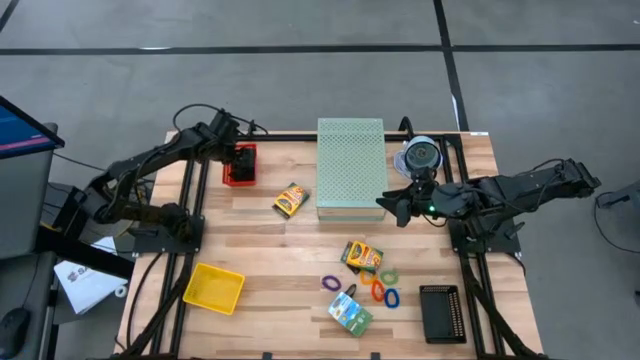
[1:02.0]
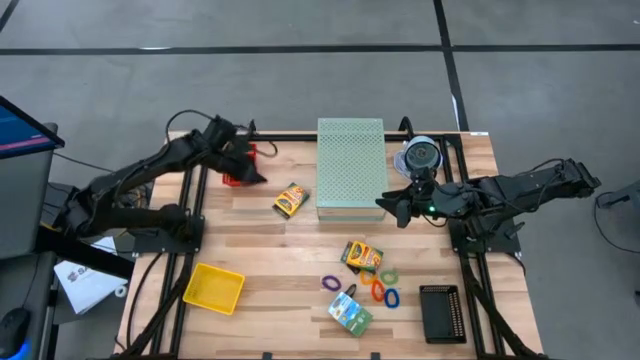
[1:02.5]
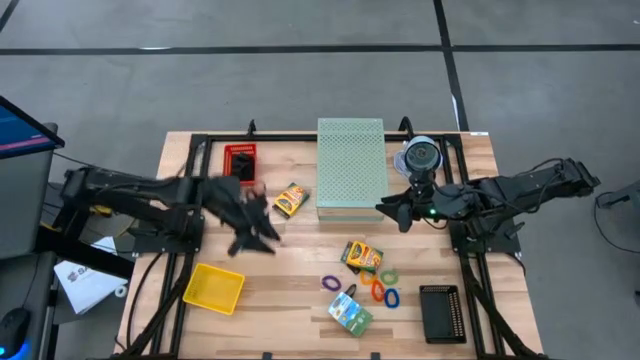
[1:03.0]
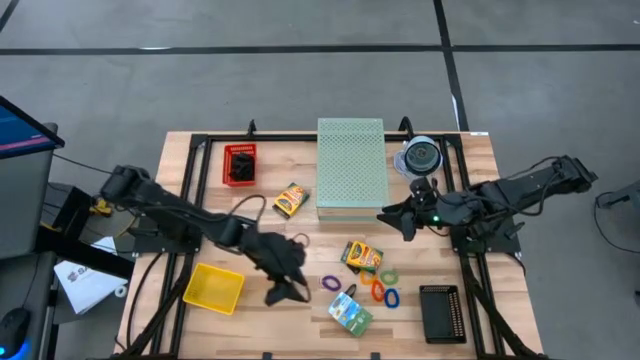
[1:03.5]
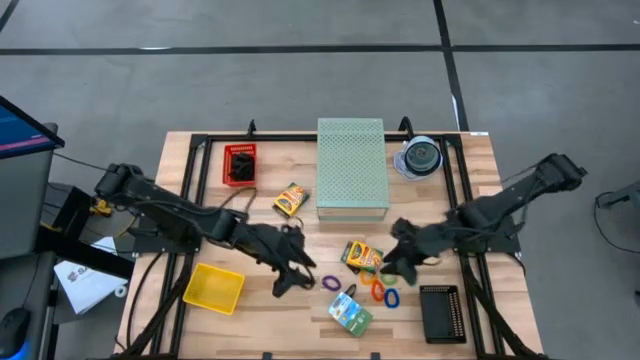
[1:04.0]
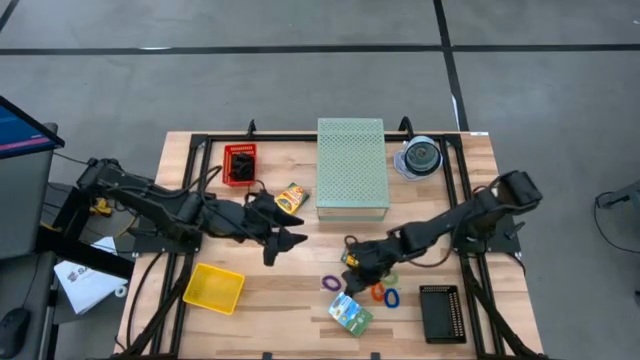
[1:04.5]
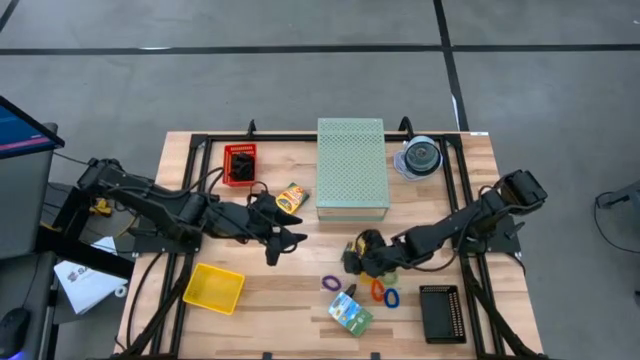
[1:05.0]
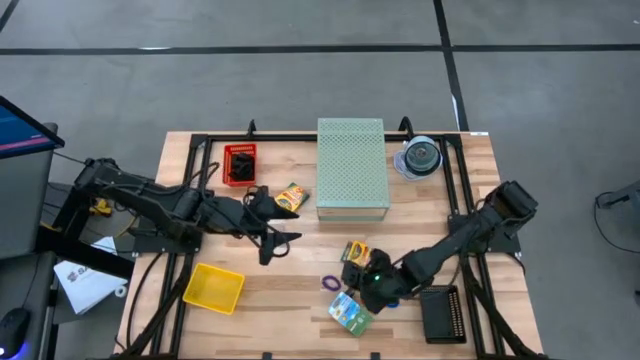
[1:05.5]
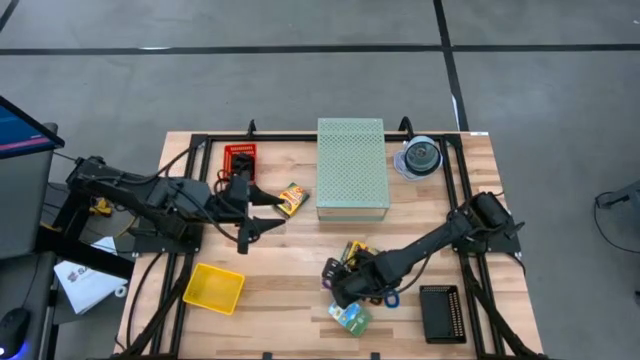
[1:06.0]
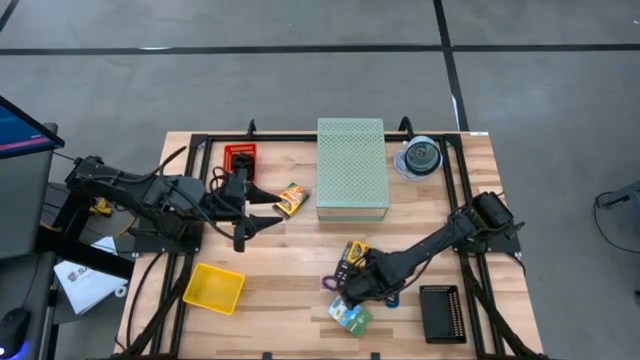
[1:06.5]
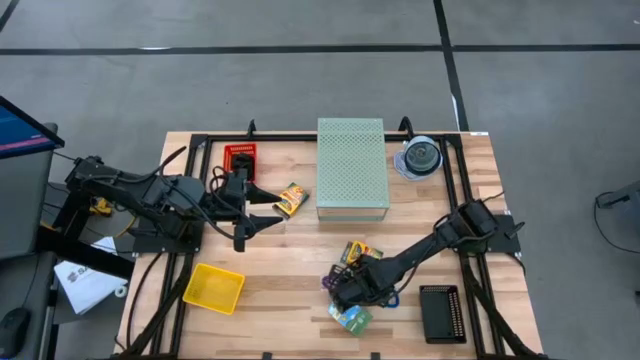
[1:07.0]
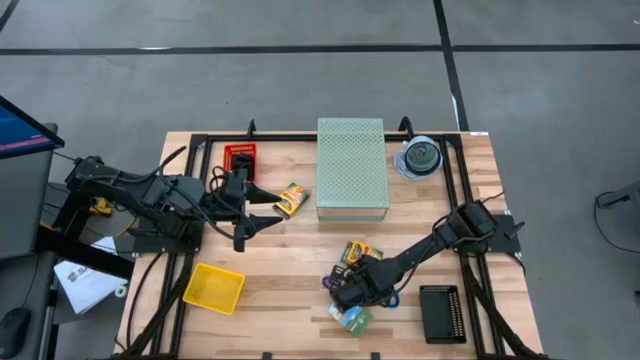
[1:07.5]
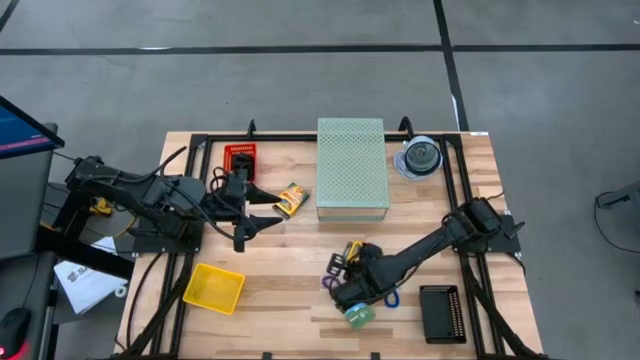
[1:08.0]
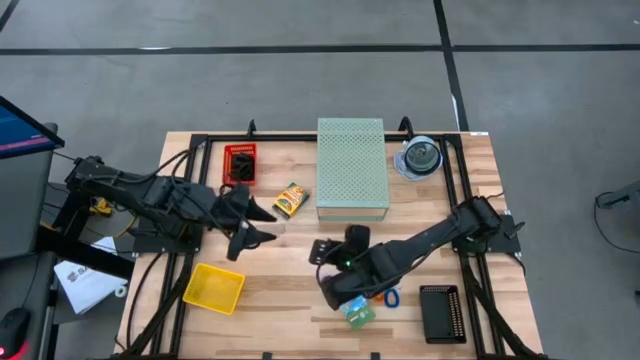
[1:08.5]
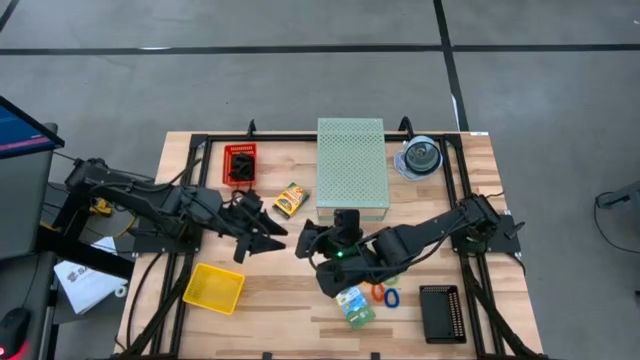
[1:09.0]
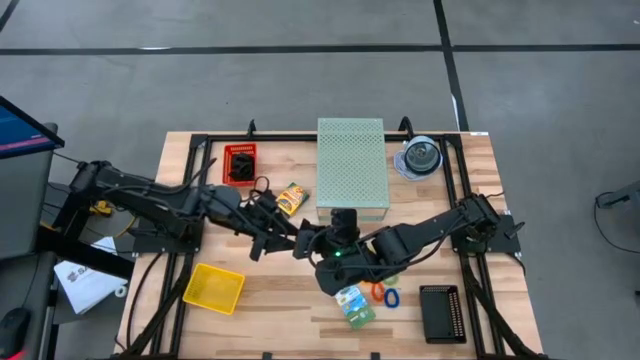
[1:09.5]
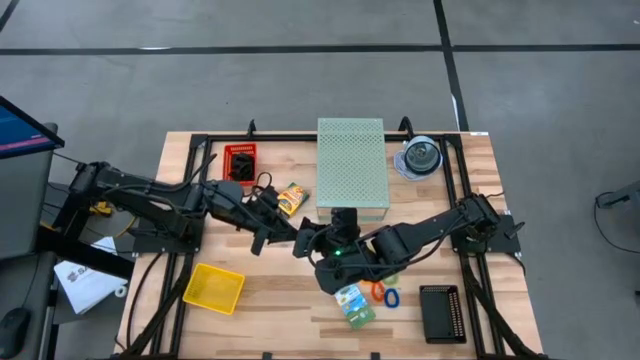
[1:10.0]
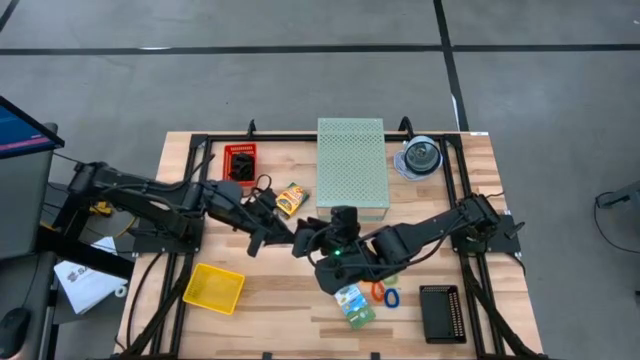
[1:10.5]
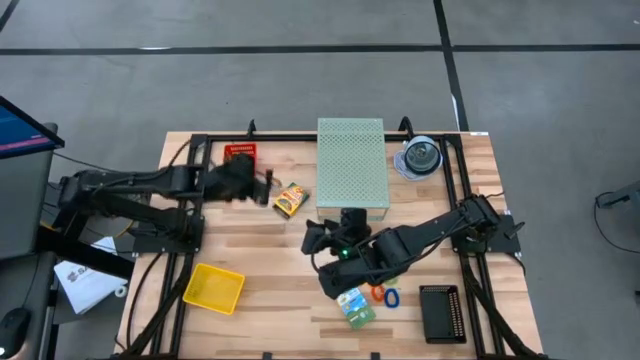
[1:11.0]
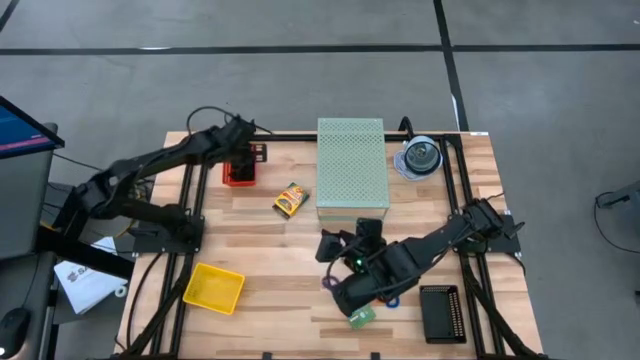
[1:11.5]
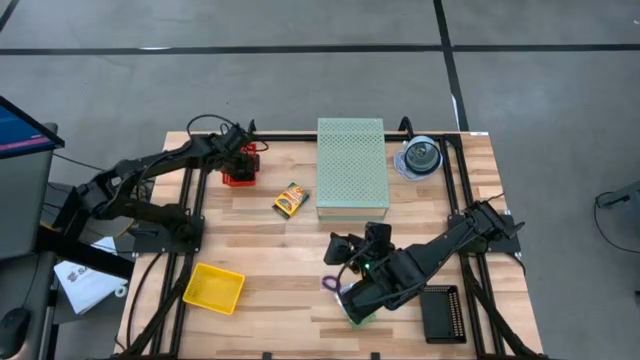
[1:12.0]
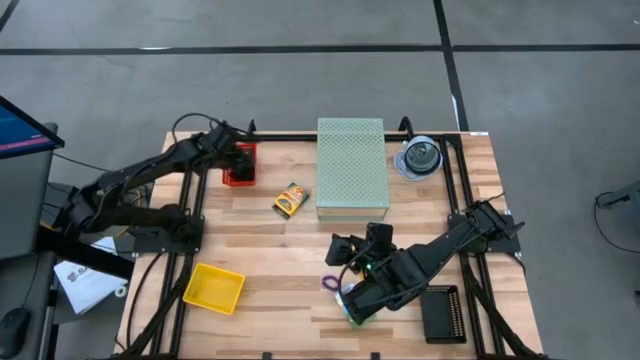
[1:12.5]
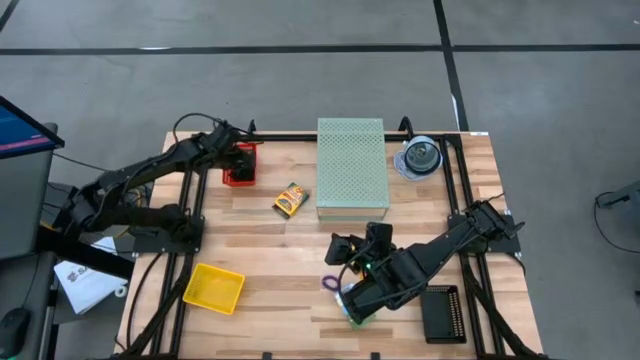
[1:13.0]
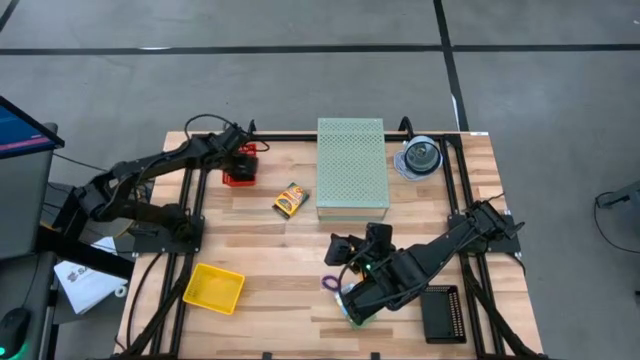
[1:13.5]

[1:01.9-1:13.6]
Task: Pick & Place Office Desk Supplies
Put the black rubber band into the red bin

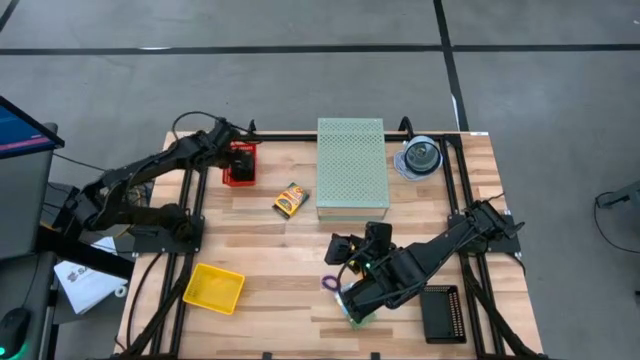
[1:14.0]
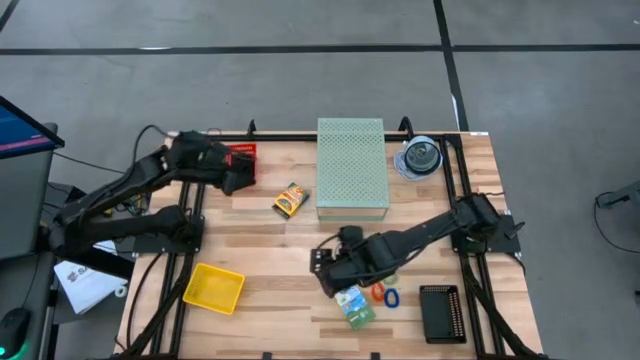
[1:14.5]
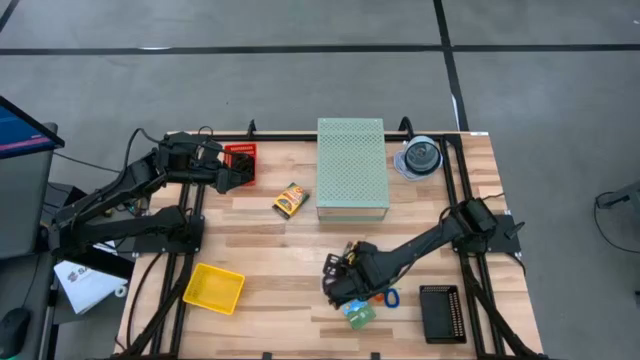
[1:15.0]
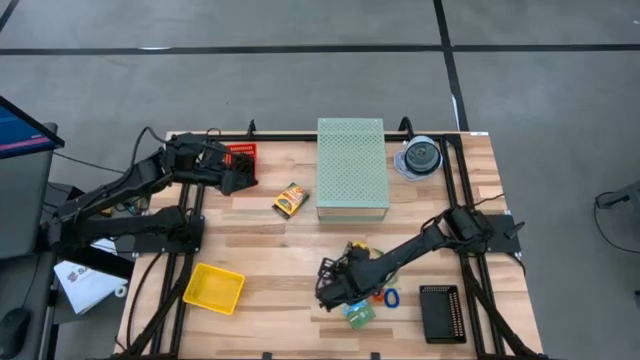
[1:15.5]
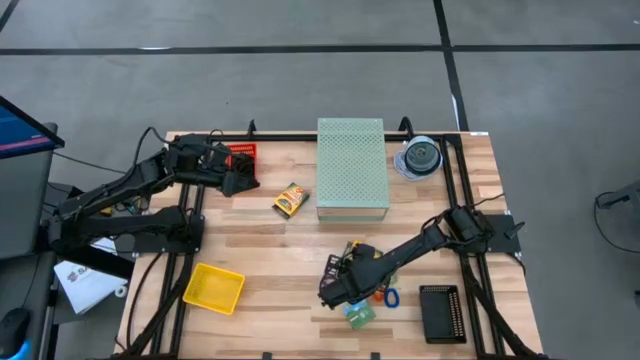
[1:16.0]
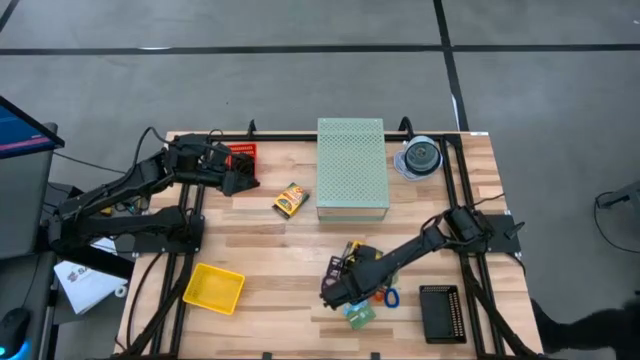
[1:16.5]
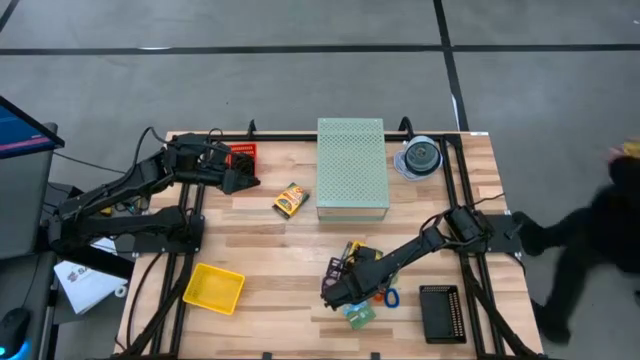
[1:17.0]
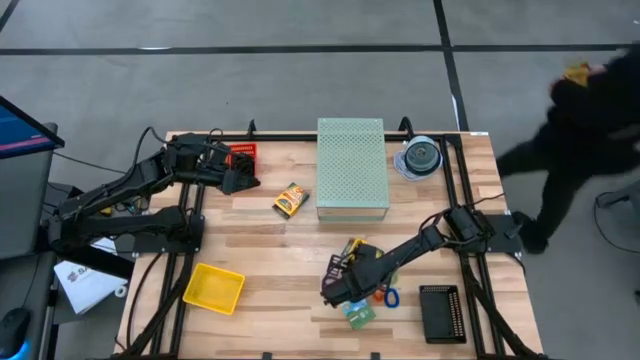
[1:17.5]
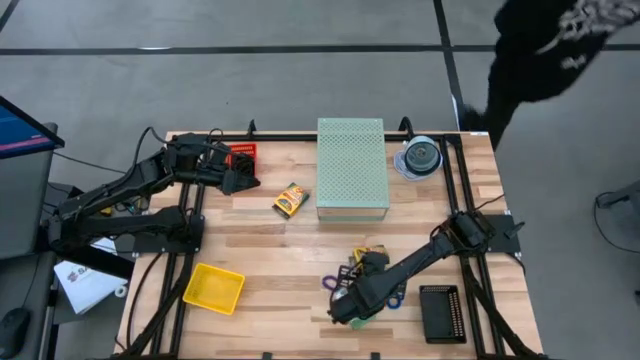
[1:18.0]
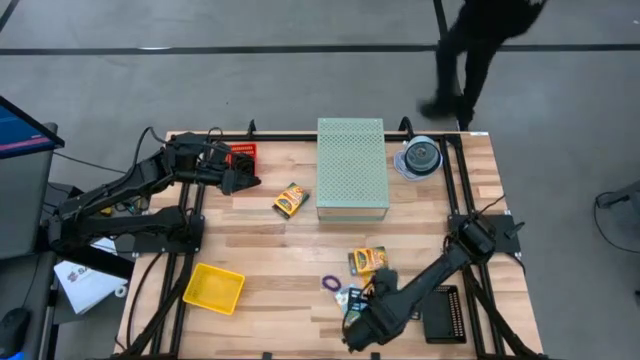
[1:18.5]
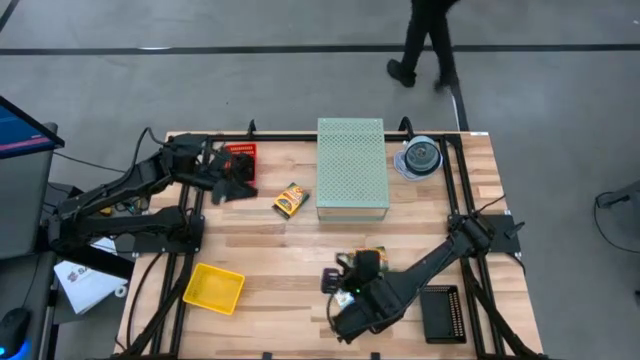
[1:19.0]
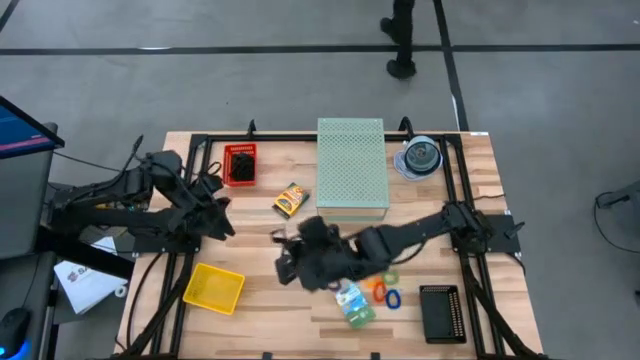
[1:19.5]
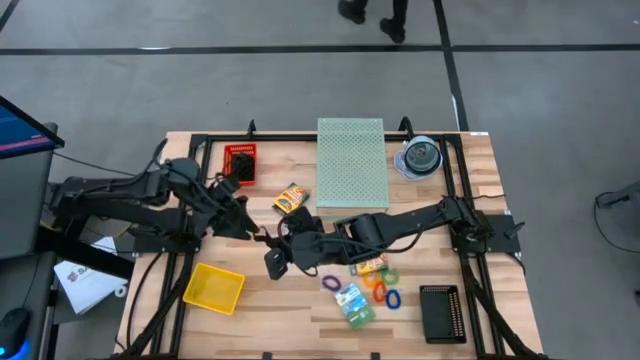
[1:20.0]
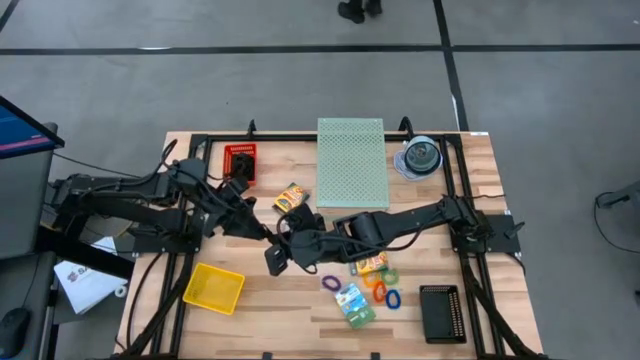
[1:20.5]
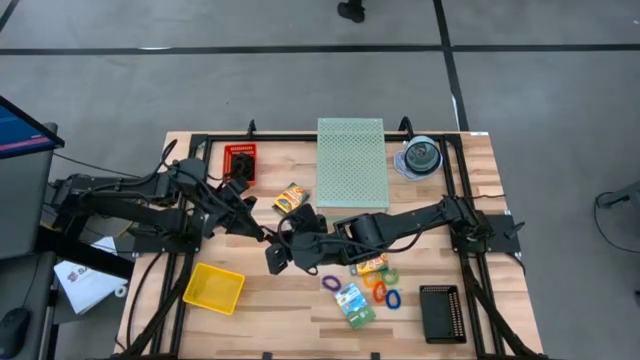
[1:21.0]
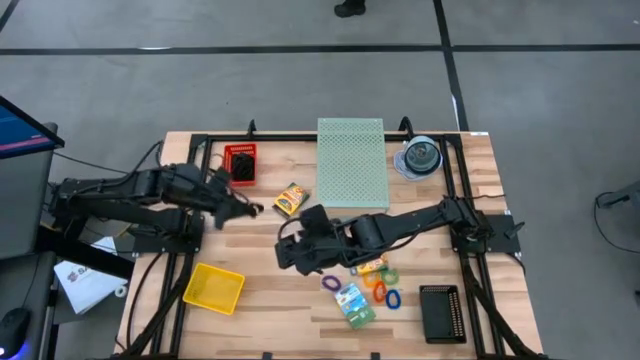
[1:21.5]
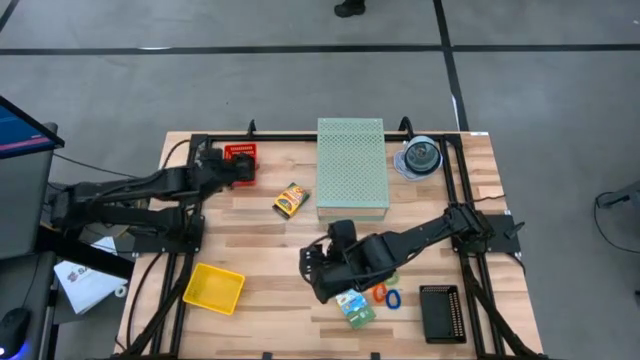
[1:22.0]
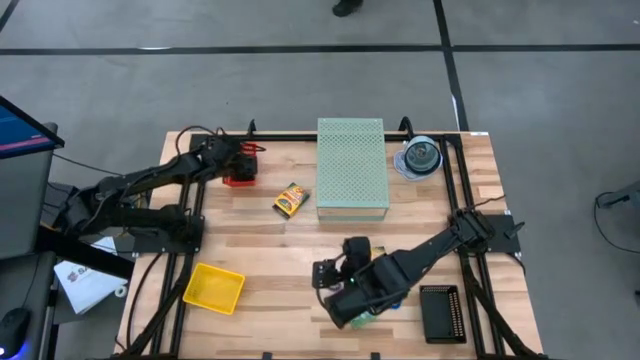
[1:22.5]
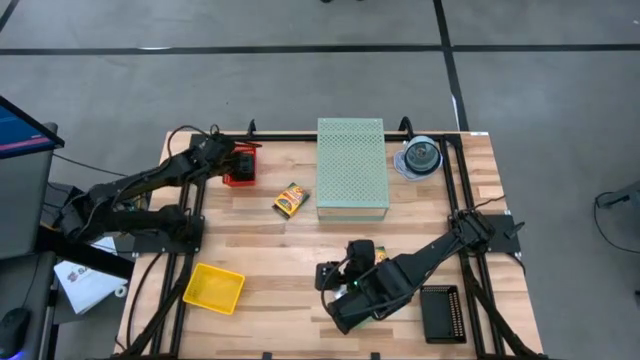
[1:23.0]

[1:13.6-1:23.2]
Put the black rubber band into the red bin
